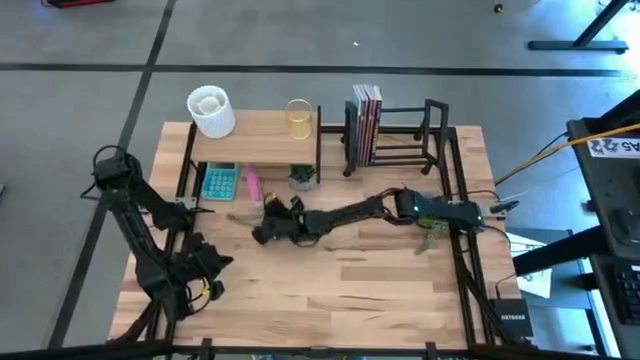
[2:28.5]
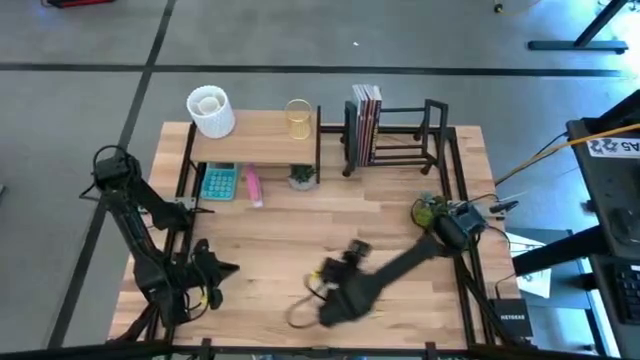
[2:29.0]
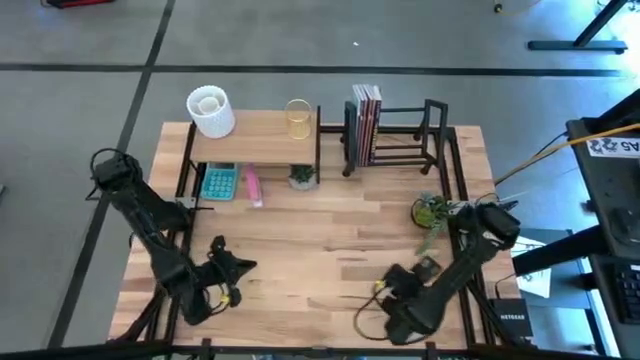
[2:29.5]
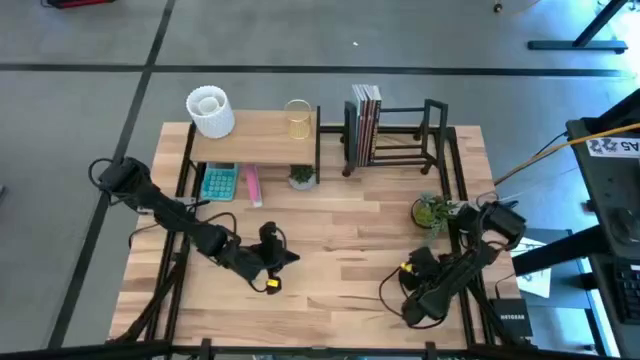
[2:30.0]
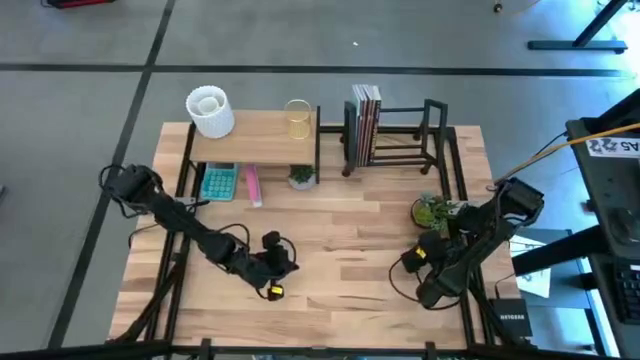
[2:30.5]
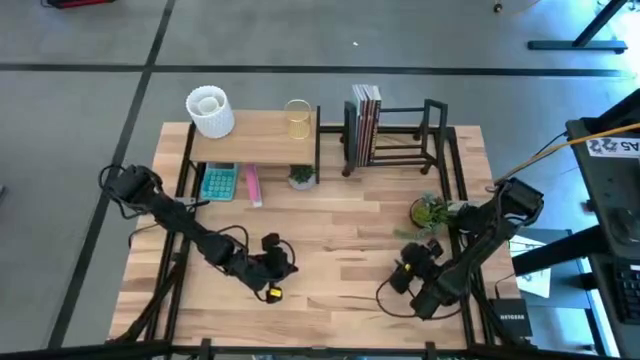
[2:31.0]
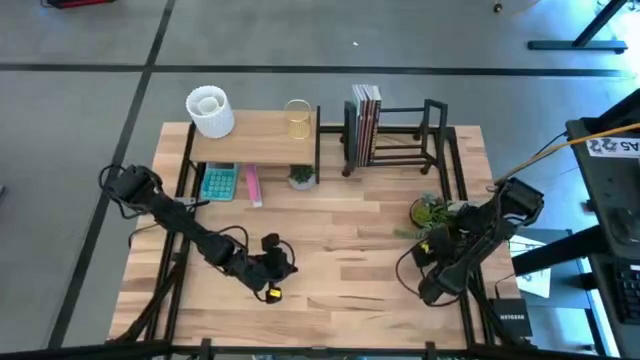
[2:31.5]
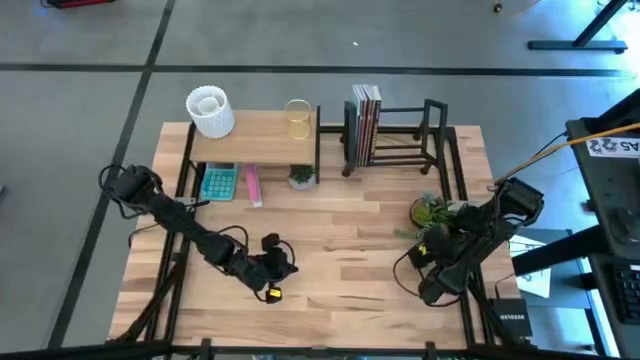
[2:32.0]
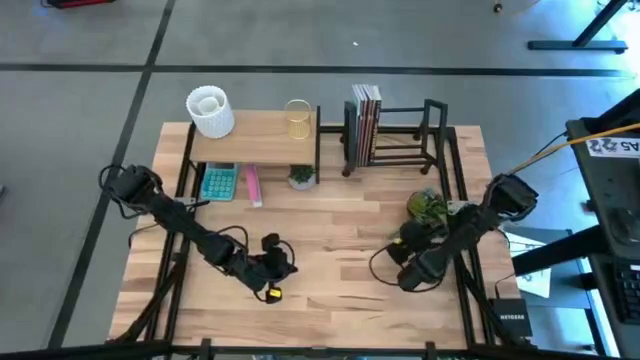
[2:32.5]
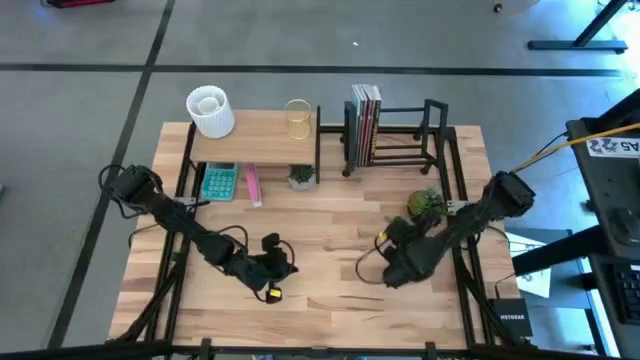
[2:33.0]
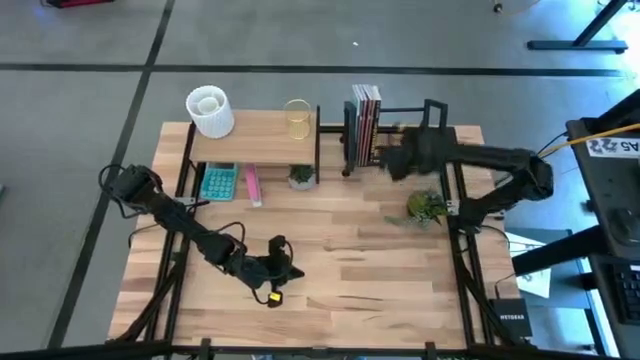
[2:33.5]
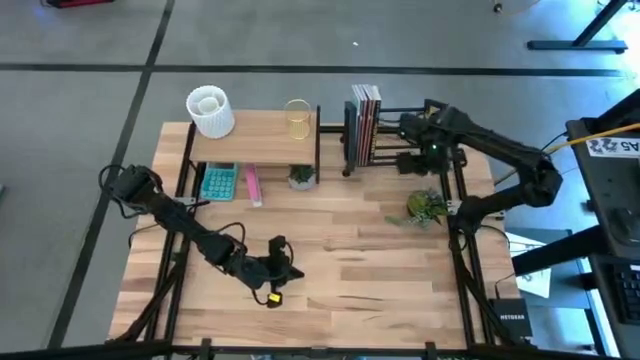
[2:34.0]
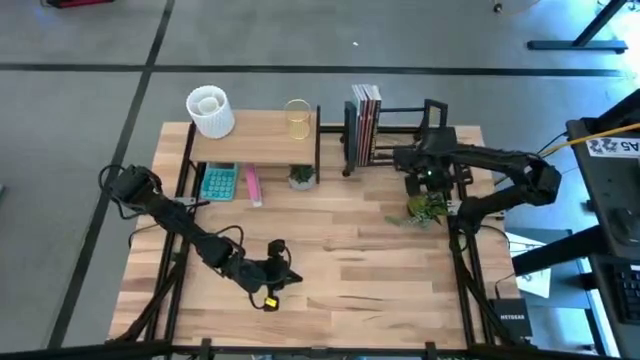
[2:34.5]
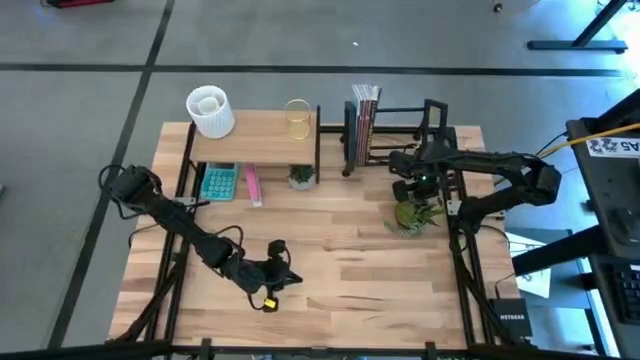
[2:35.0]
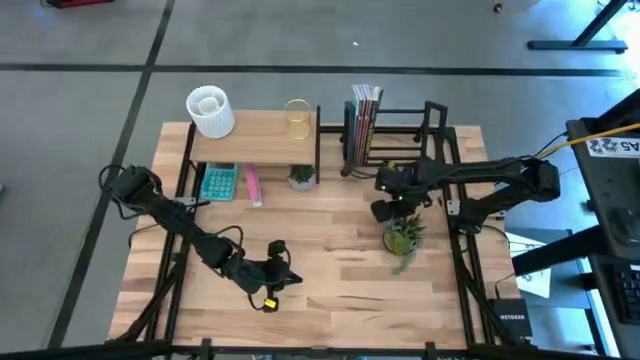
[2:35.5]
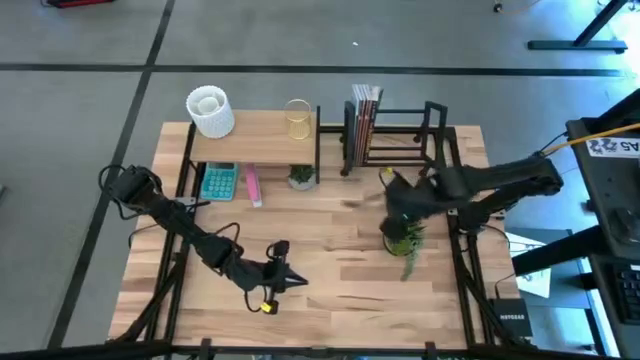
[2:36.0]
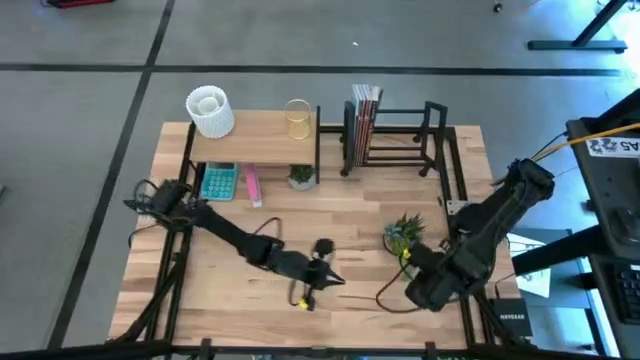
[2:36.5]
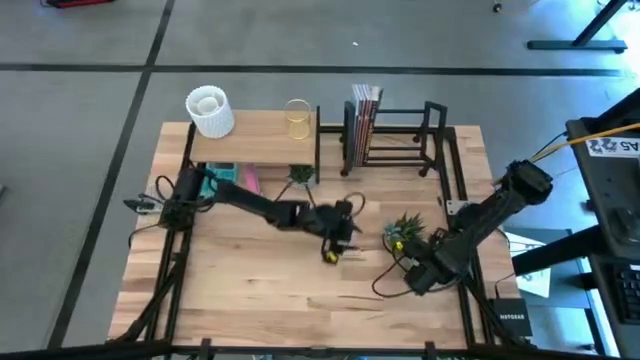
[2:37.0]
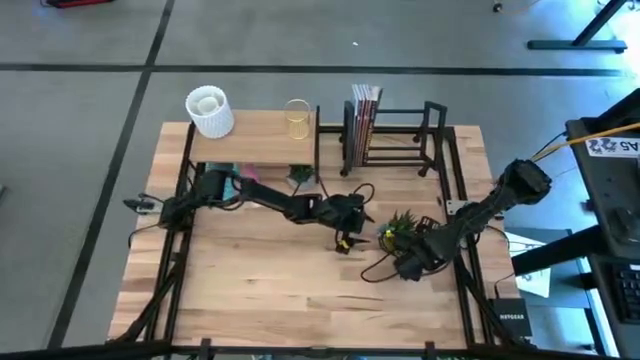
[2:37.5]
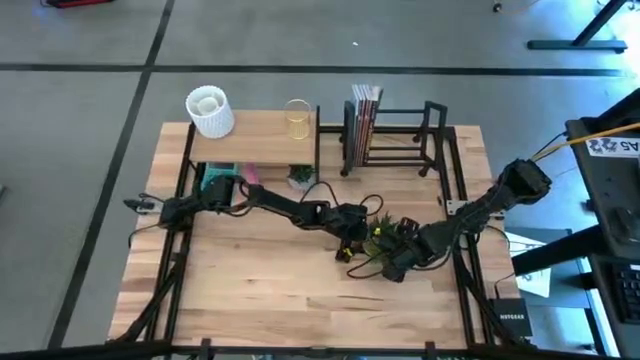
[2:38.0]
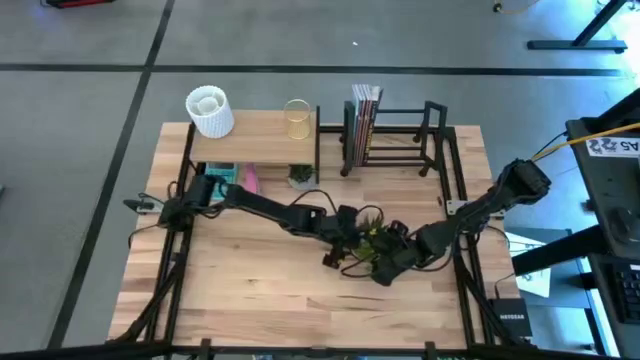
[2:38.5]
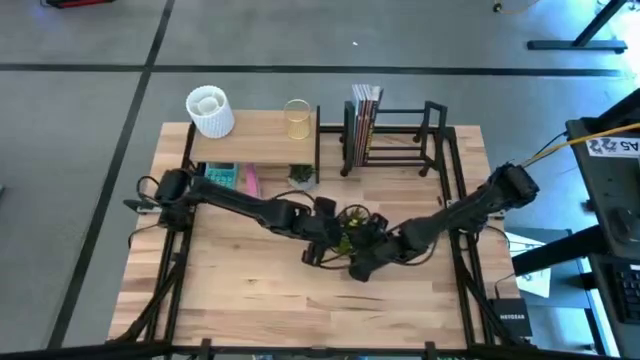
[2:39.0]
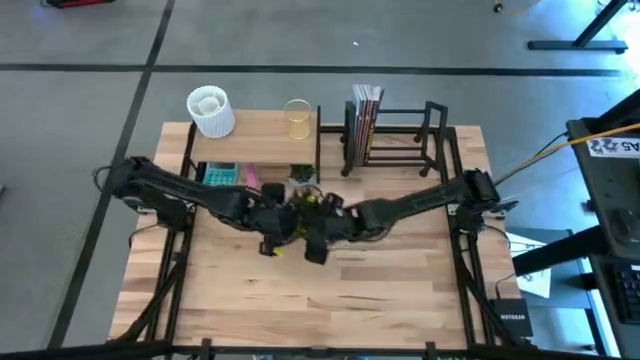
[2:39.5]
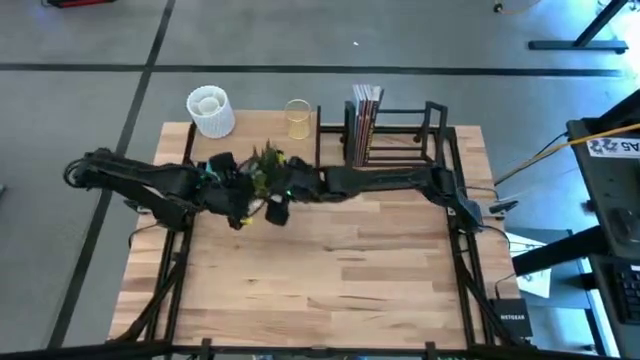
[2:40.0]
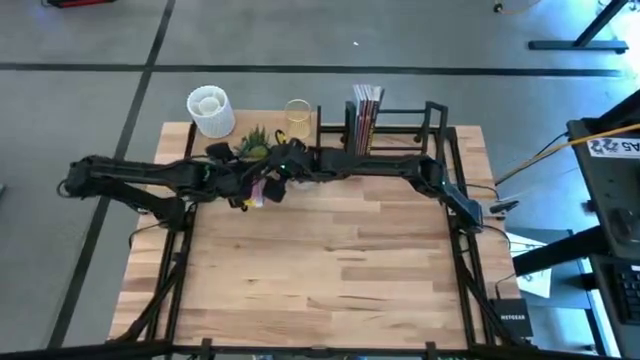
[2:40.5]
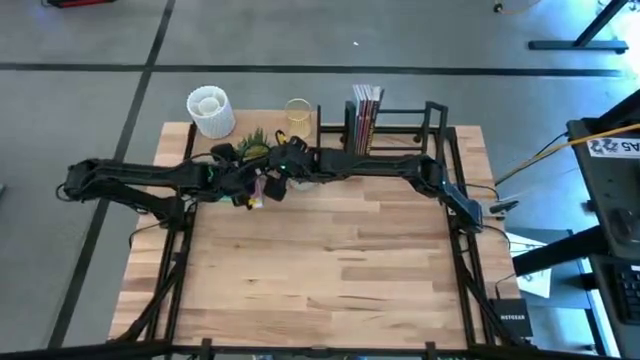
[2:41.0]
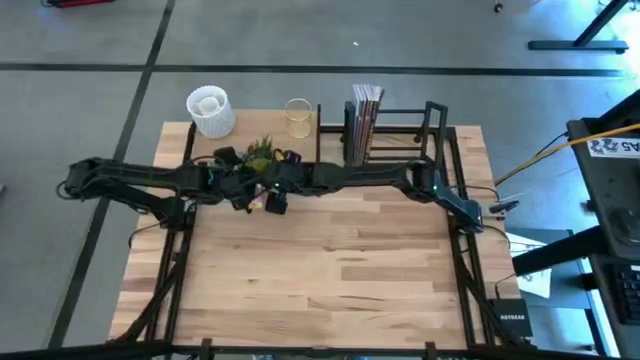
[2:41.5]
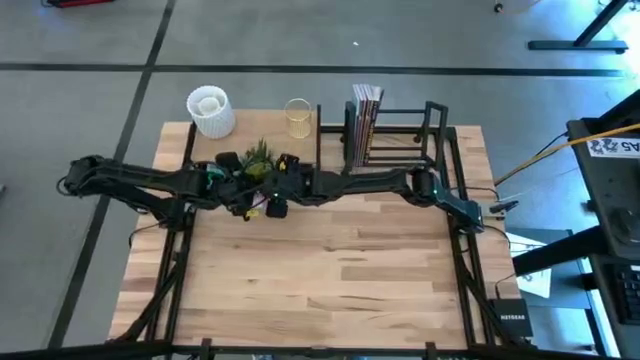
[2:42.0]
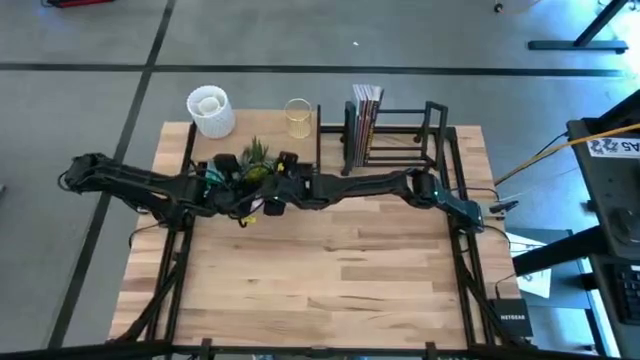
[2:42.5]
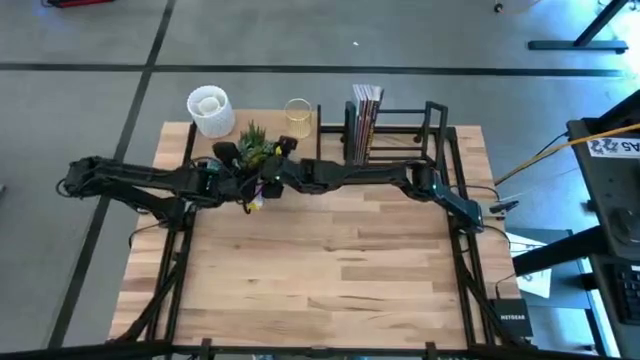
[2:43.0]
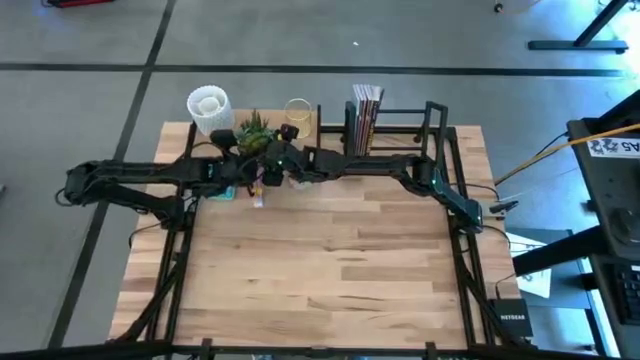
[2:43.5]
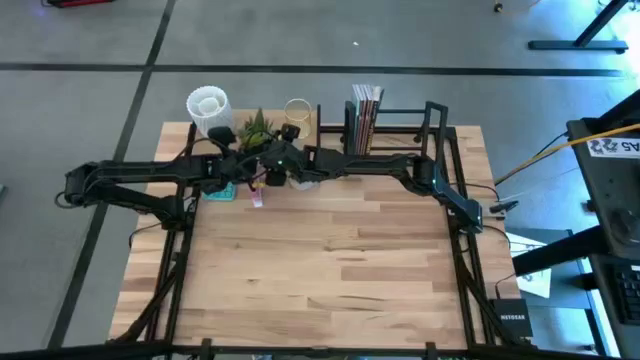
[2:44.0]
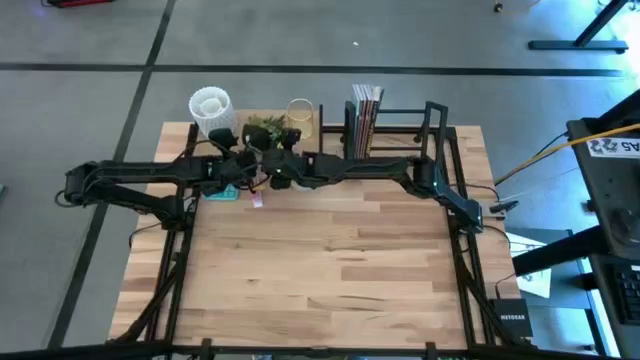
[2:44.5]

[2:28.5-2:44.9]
Task: Stock shelves
Put the black plant vase on the shelf

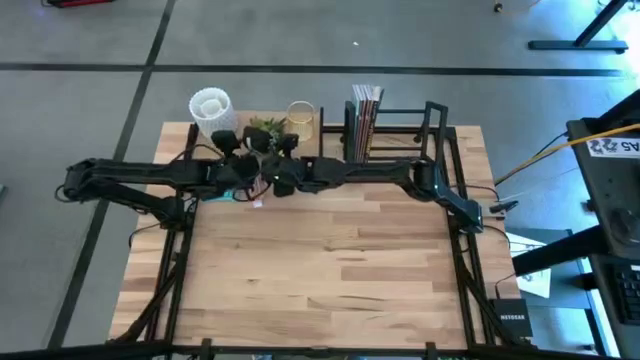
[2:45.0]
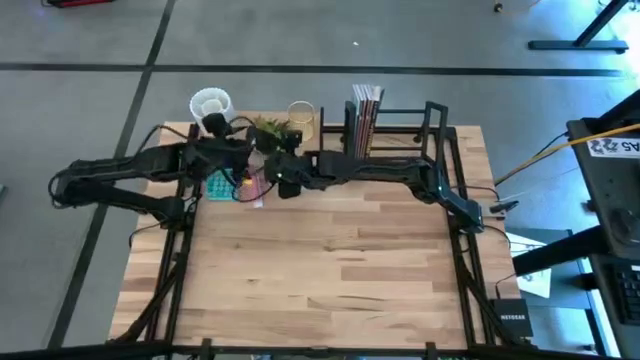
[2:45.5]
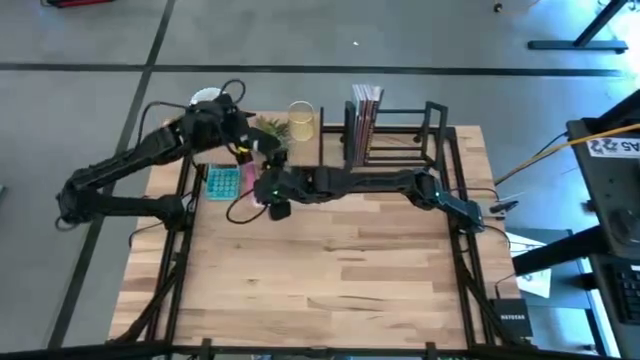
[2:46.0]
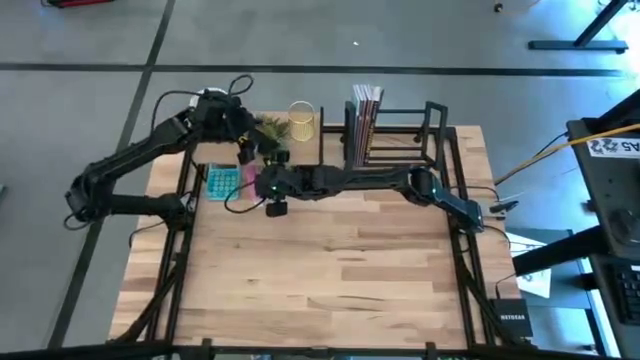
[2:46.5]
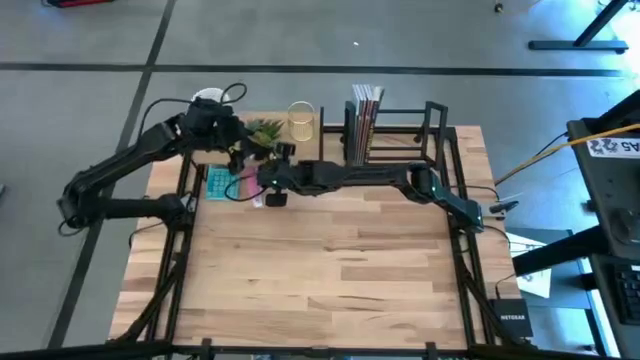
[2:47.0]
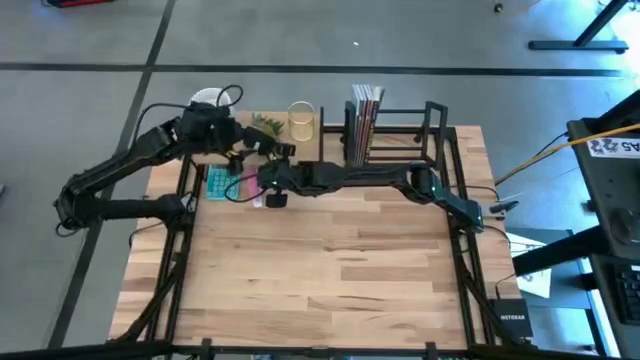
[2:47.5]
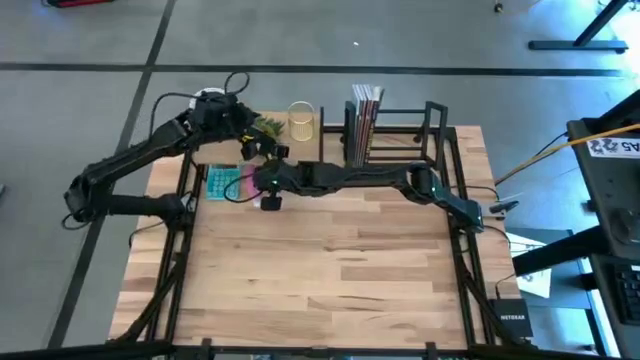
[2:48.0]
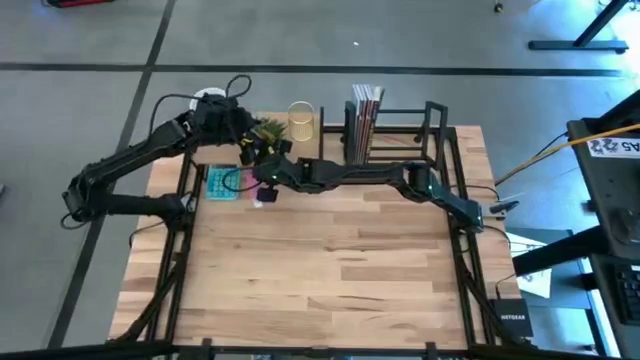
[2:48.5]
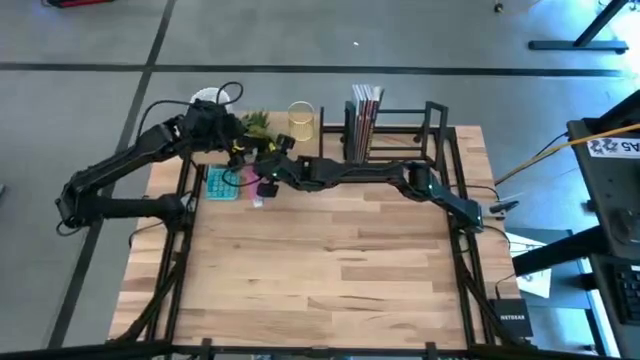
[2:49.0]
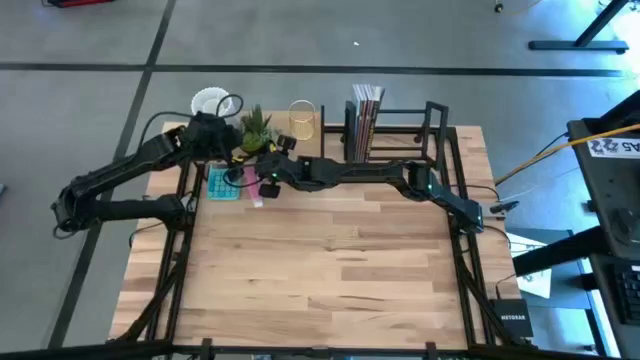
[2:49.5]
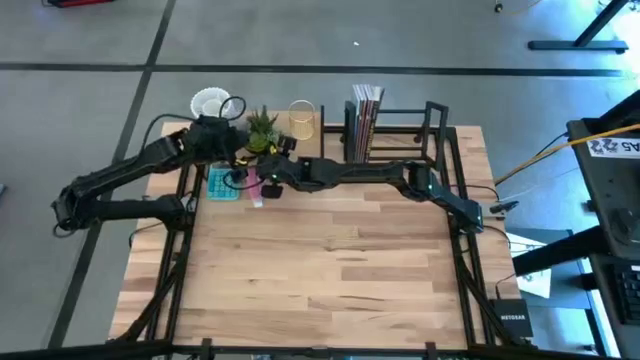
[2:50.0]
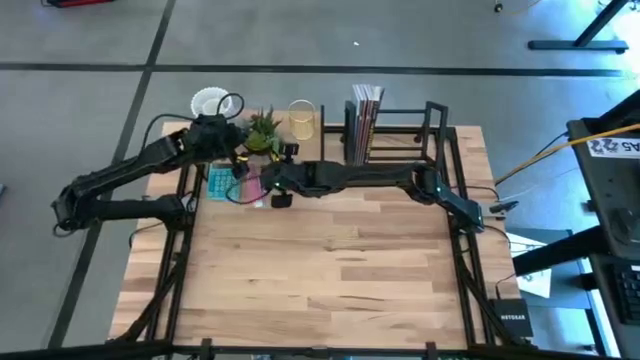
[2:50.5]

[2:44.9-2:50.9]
Put the black plant vase on the shelf
